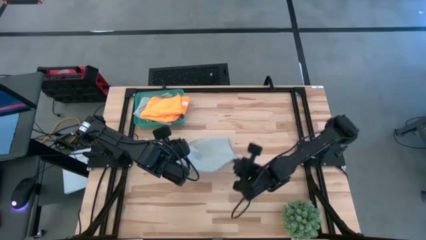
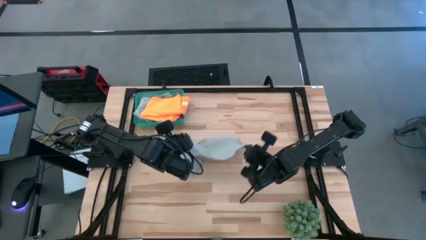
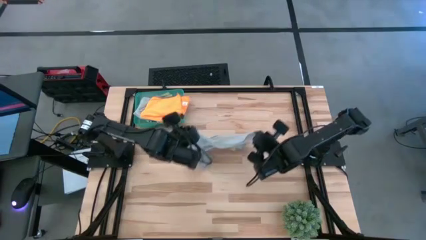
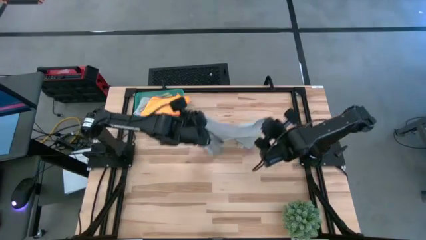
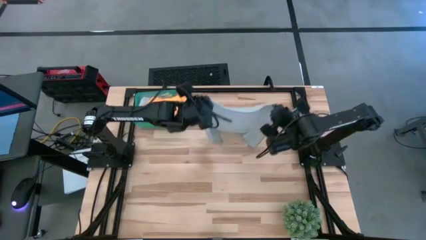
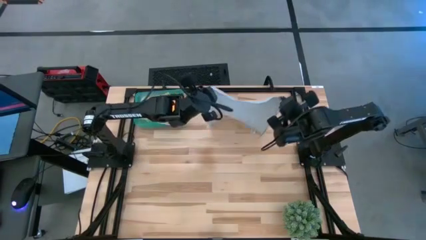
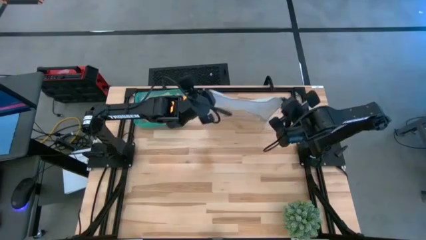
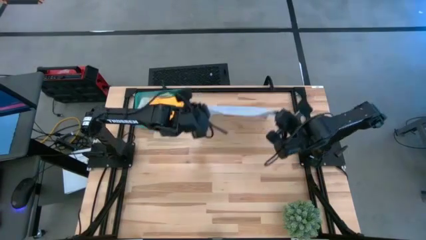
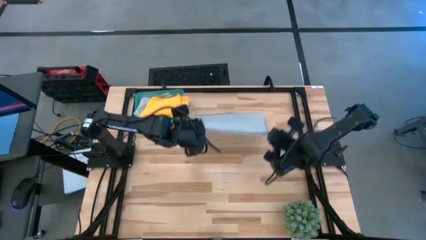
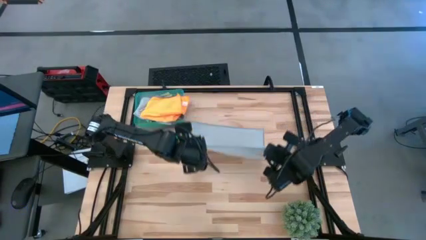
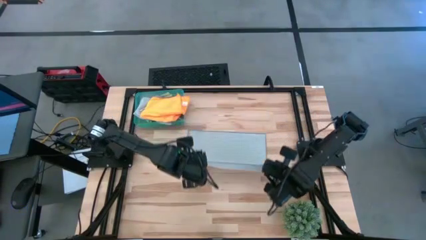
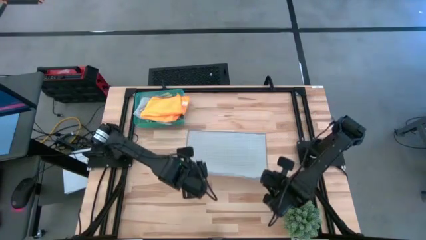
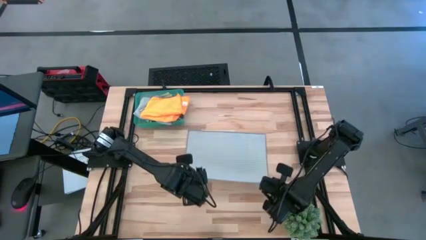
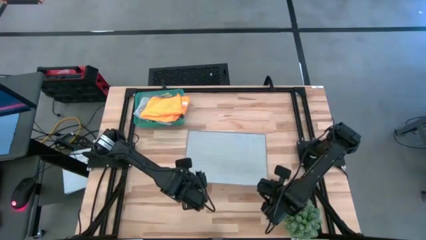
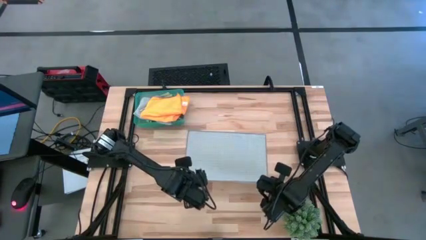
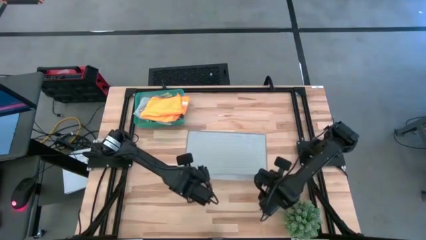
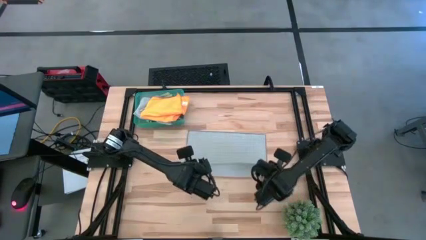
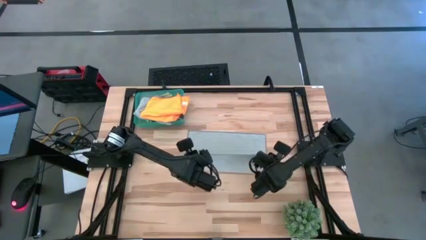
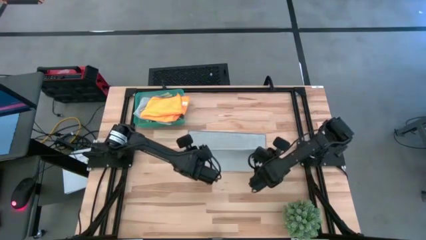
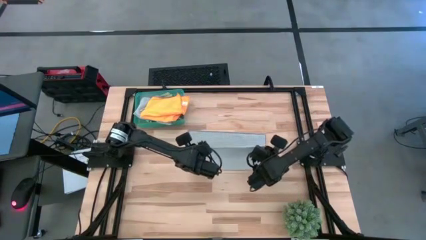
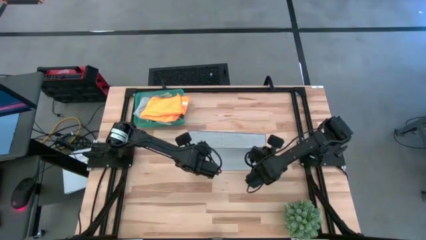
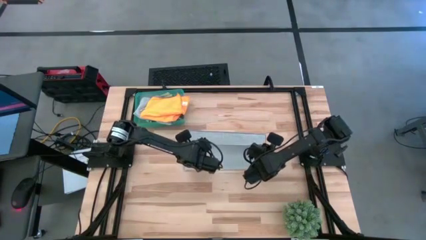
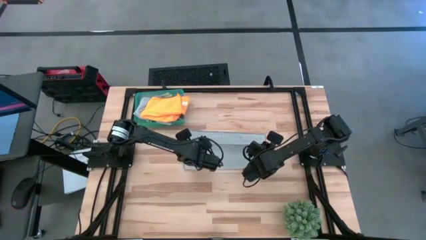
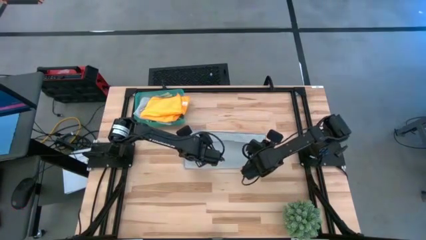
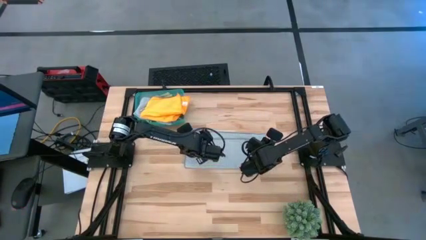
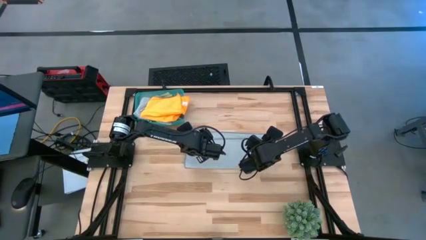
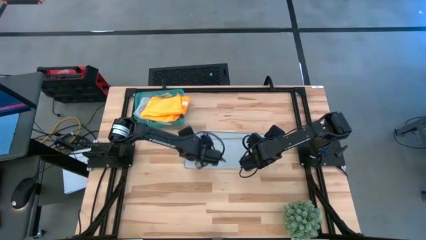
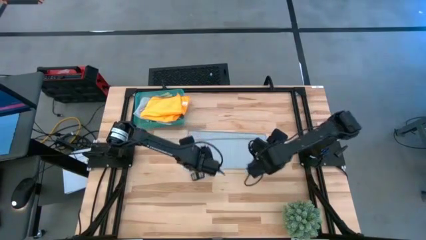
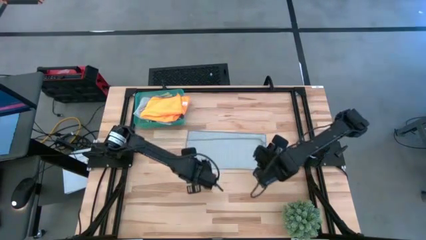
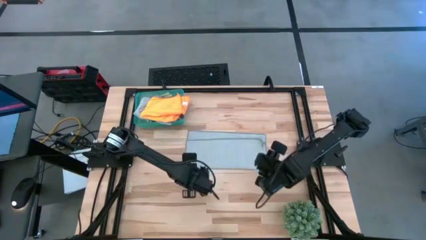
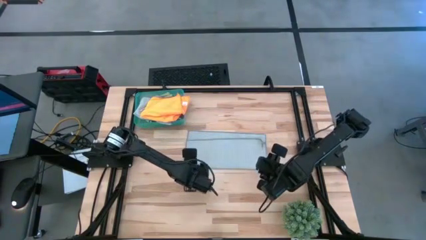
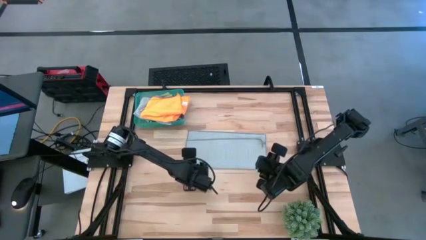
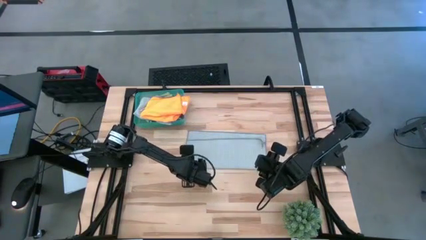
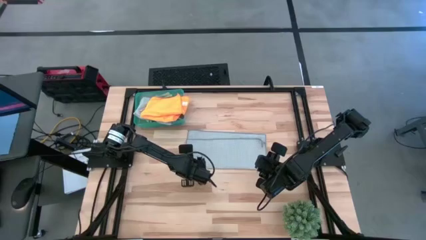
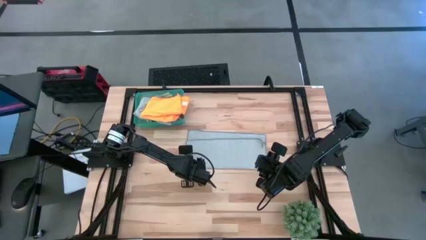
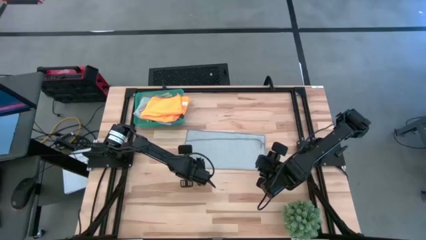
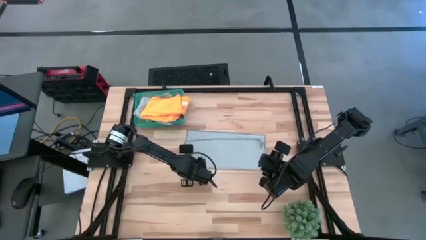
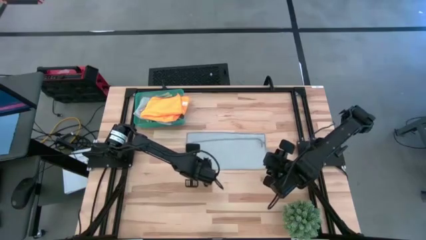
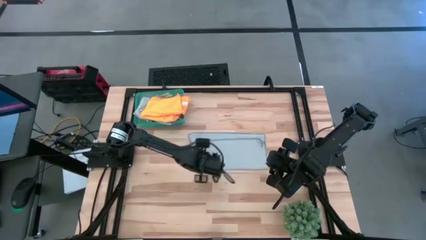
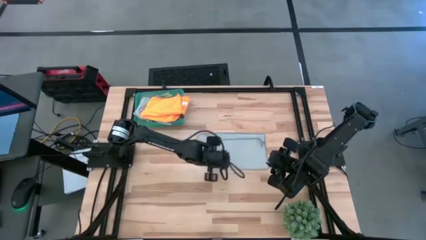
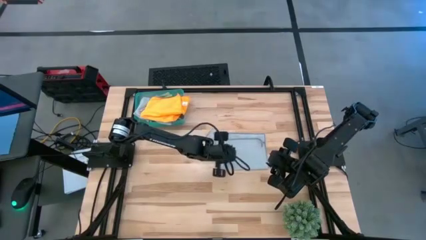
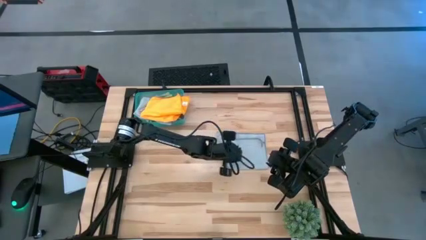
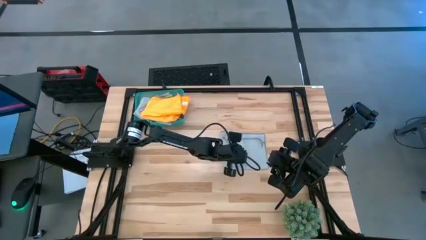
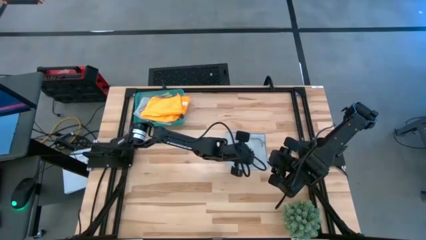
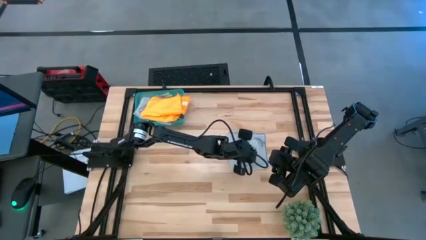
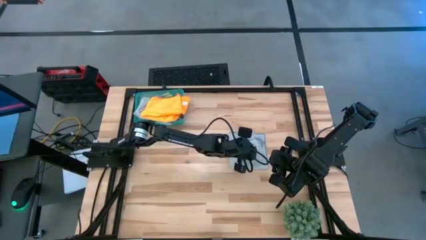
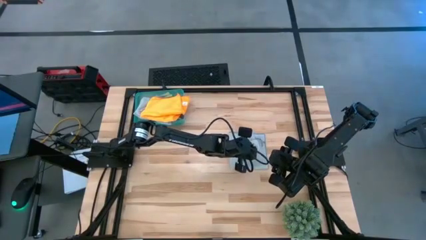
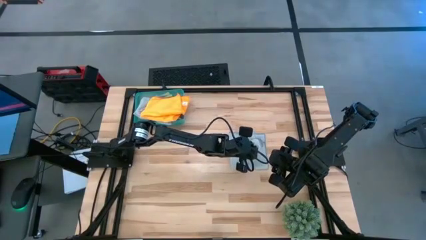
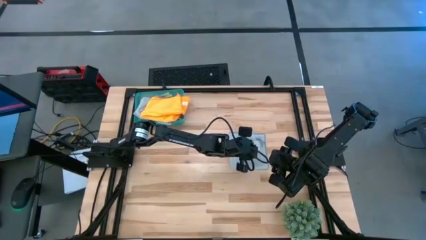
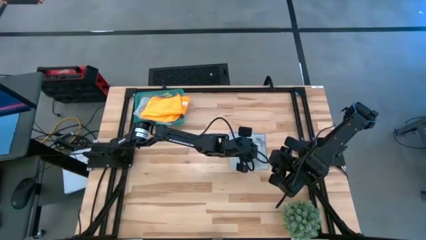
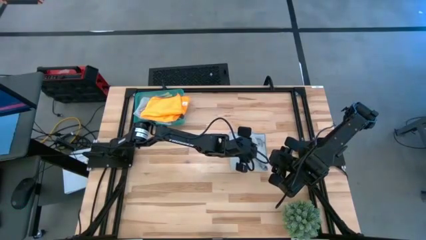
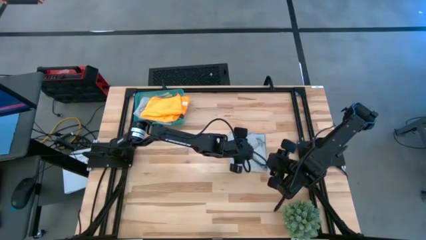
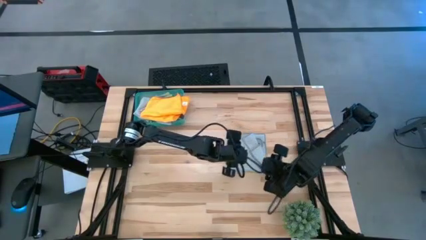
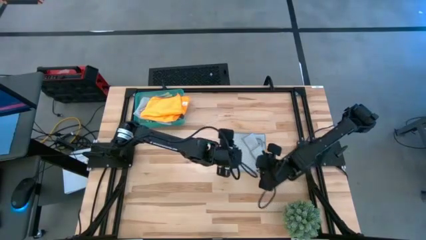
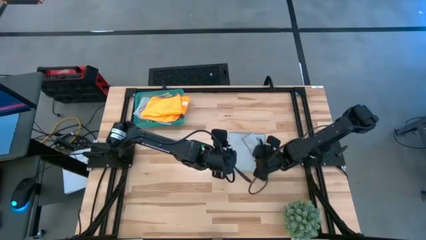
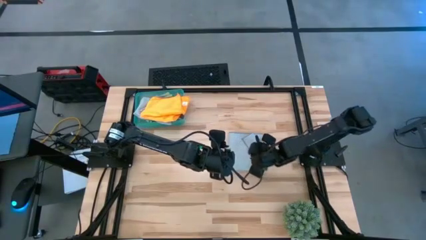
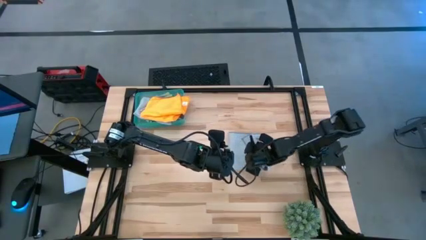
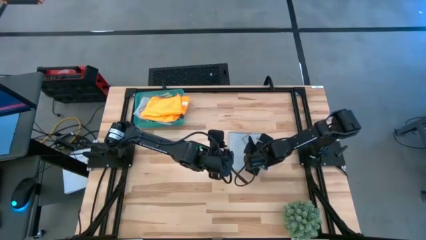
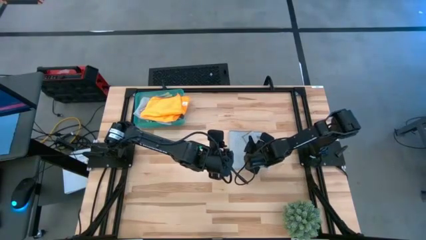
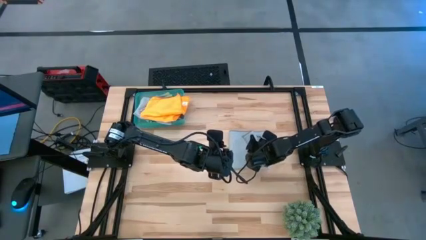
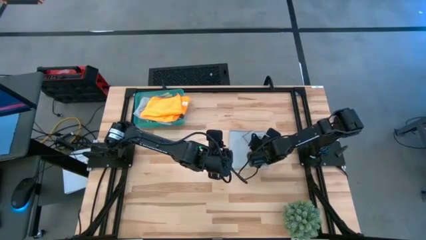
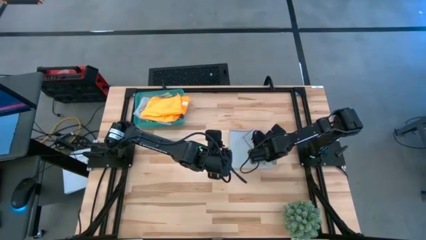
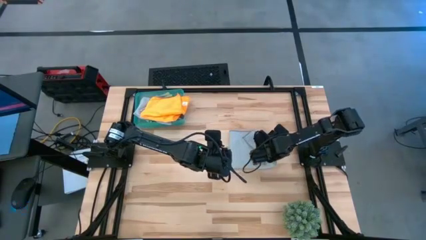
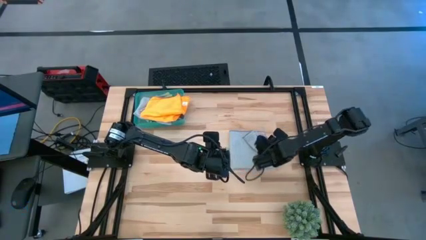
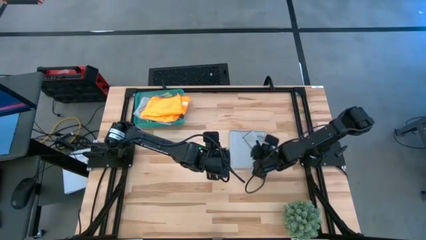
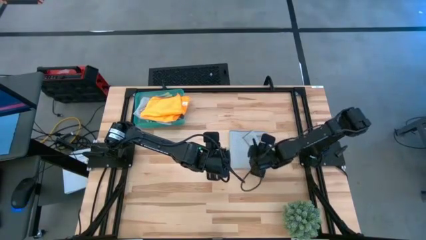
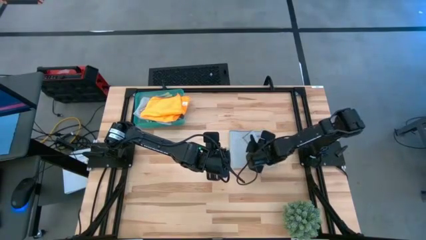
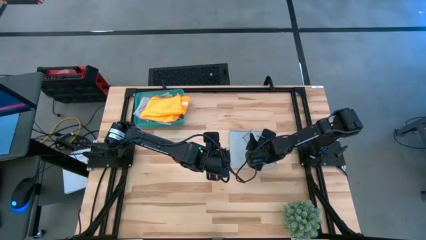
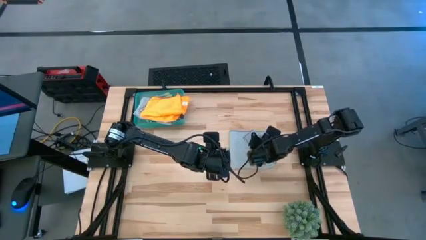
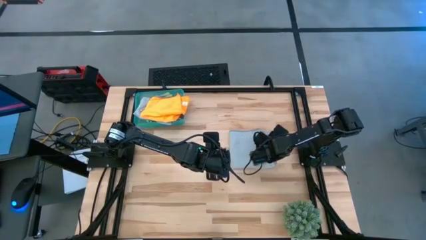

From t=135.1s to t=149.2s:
Task: Fold microfiber towels
Fold the gray towel

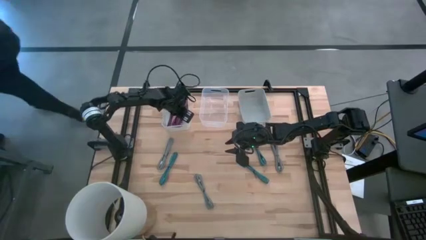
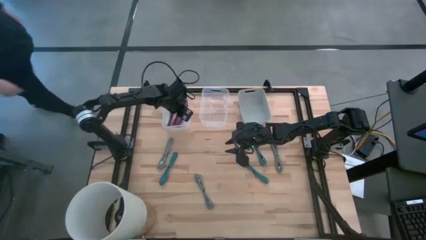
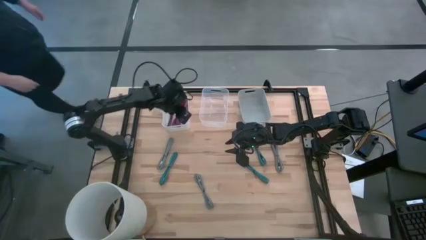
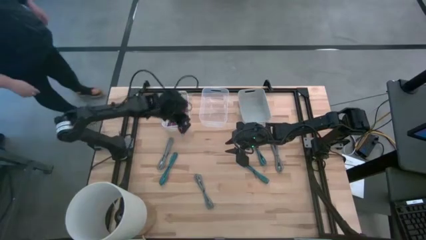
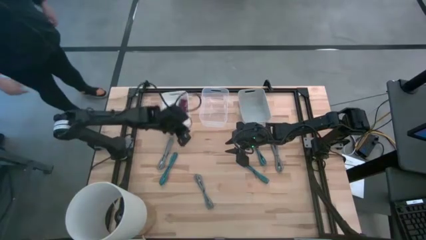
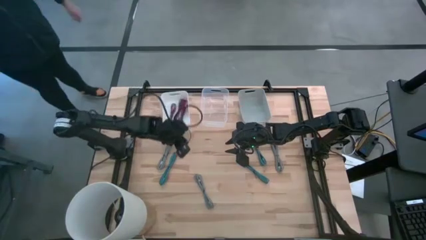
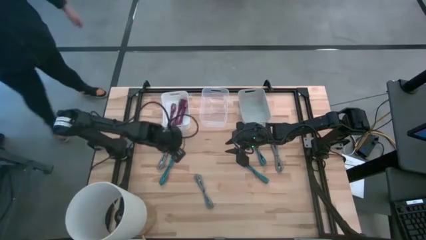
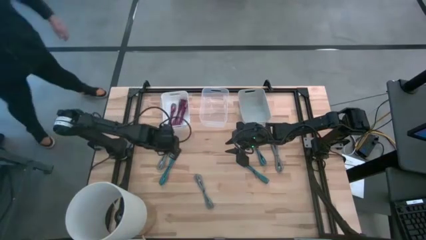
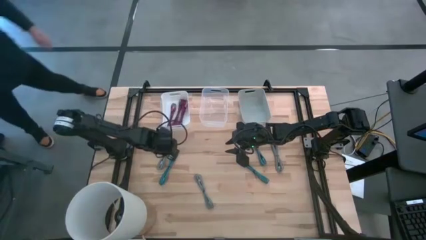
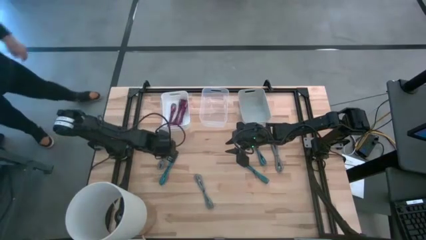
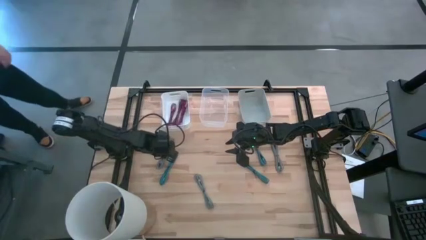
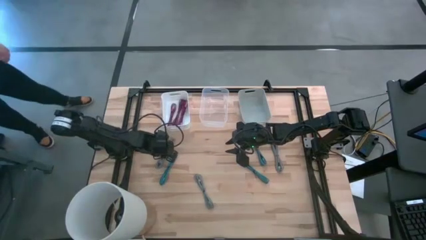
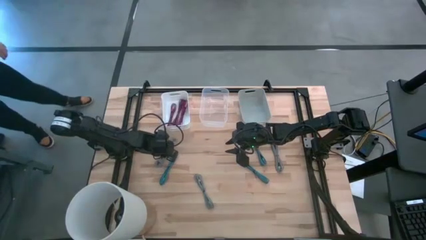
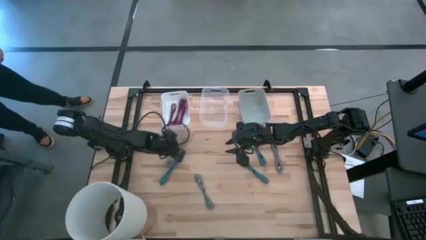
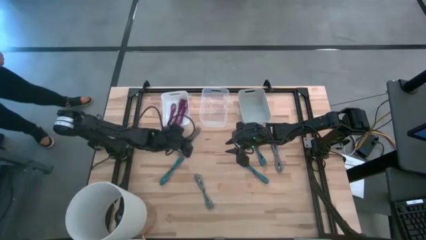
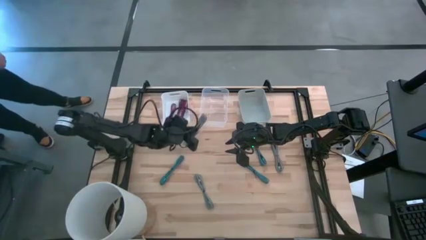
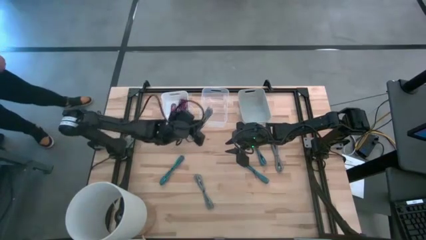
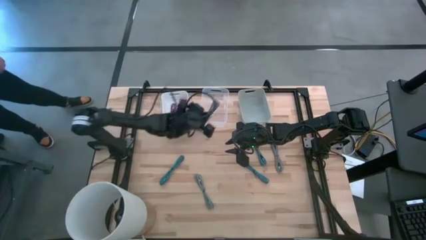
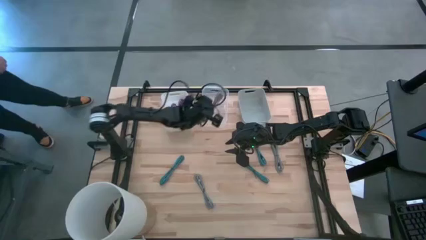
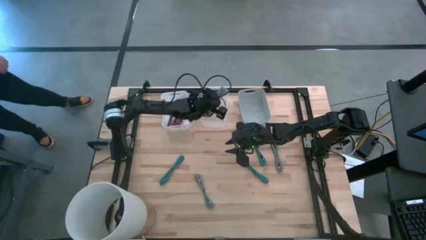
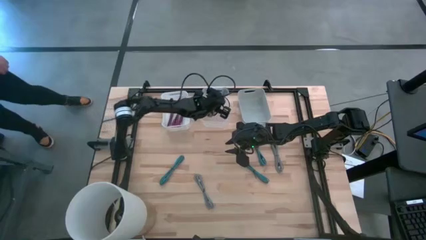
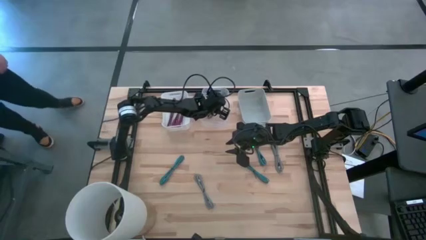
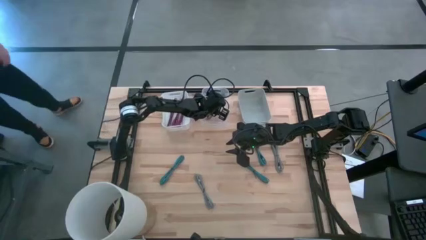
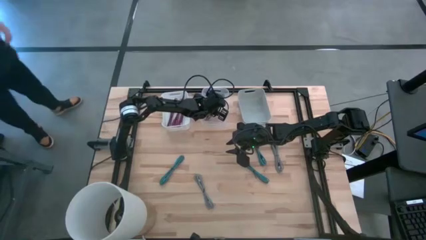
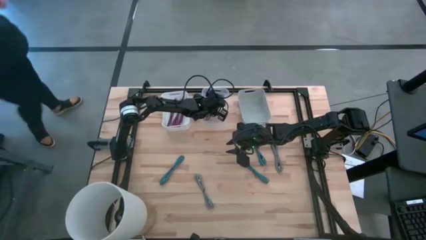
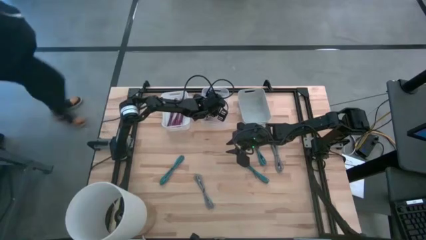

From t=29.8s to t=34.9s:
Task: Pick & Place USB Port
Put the left white charger cable into the transparent bin
